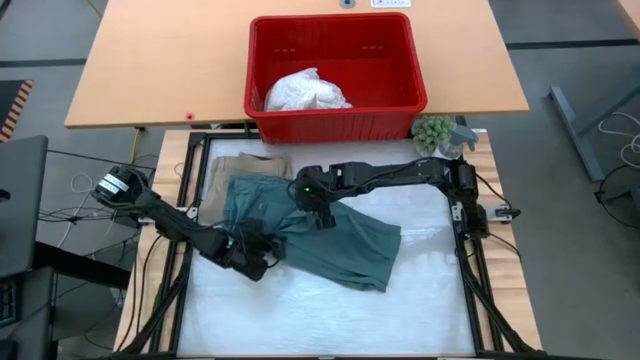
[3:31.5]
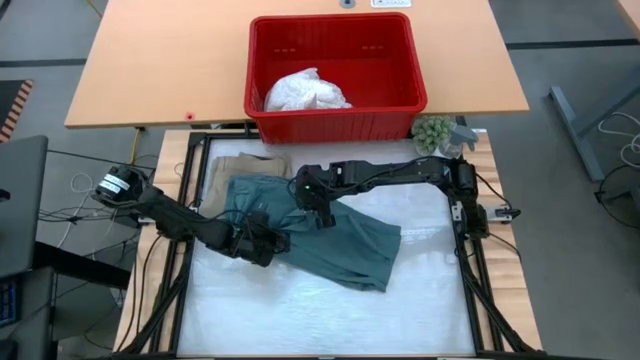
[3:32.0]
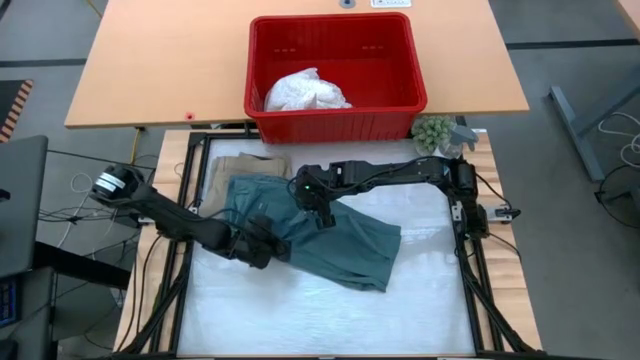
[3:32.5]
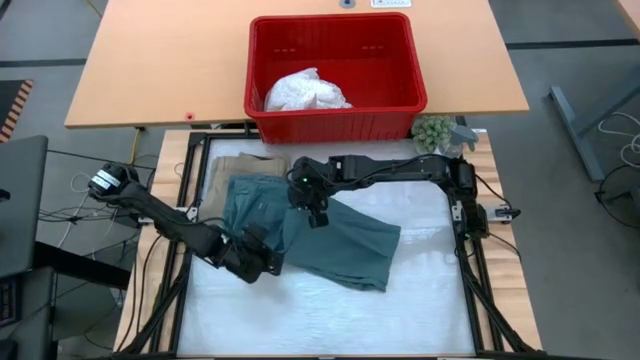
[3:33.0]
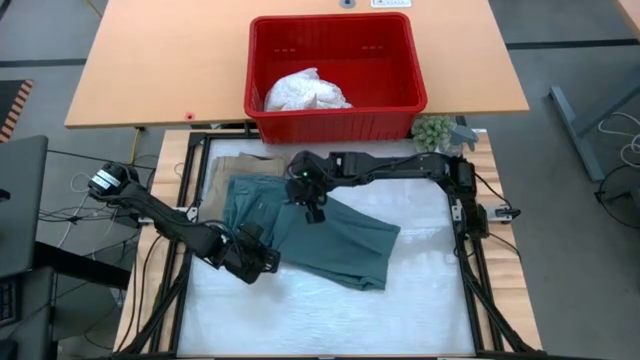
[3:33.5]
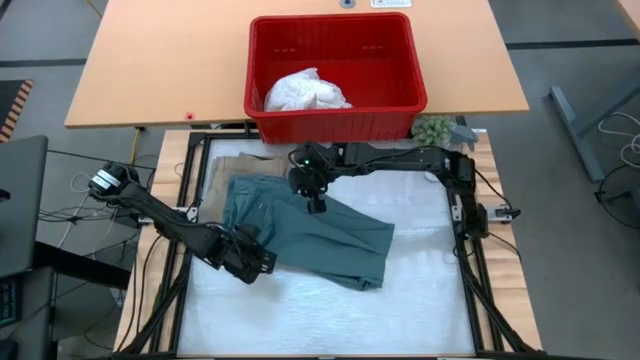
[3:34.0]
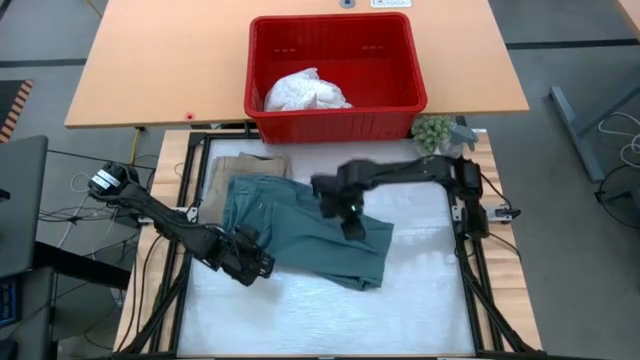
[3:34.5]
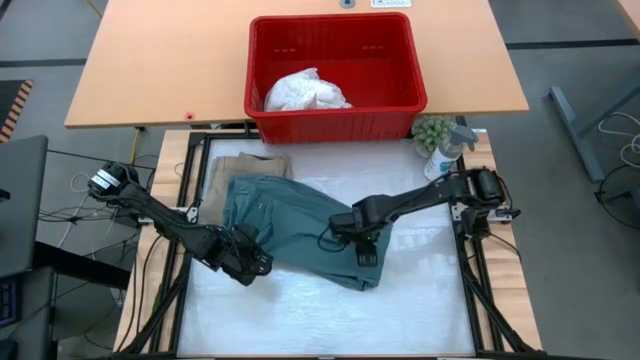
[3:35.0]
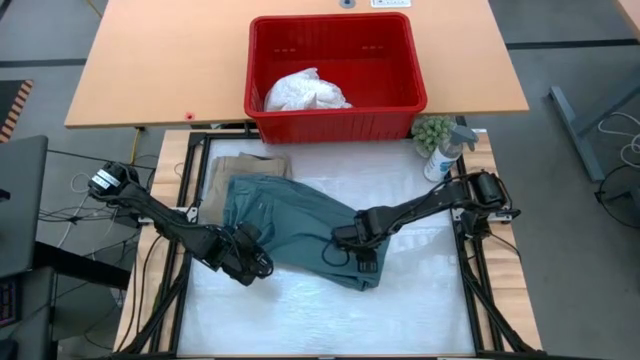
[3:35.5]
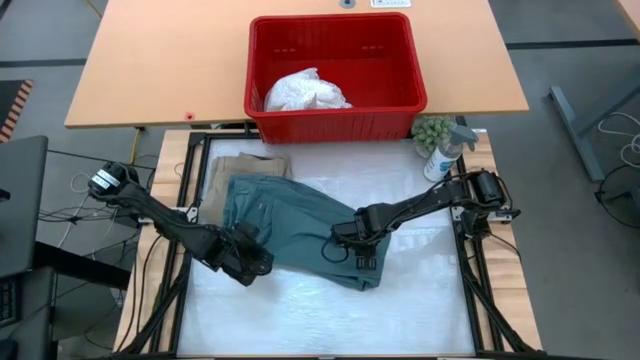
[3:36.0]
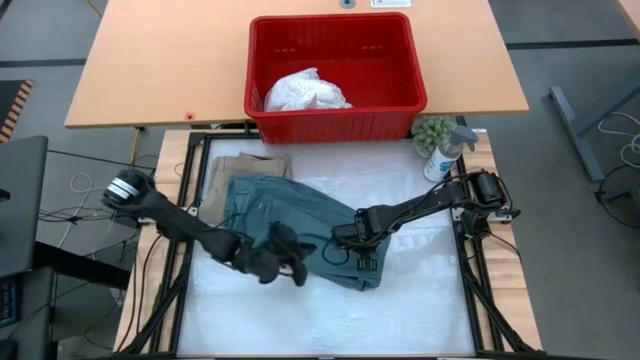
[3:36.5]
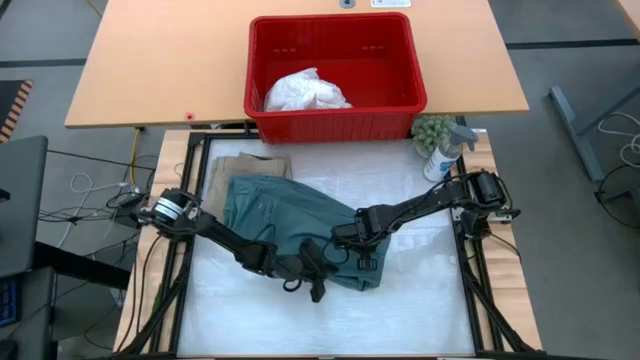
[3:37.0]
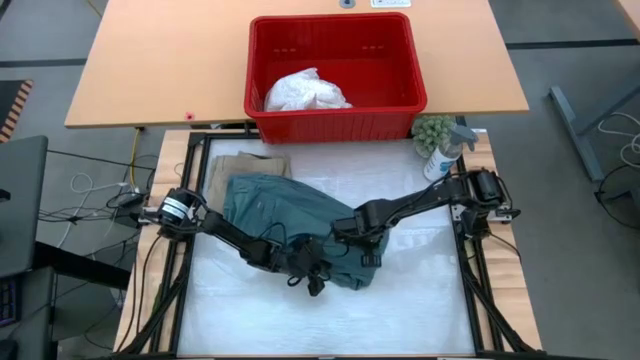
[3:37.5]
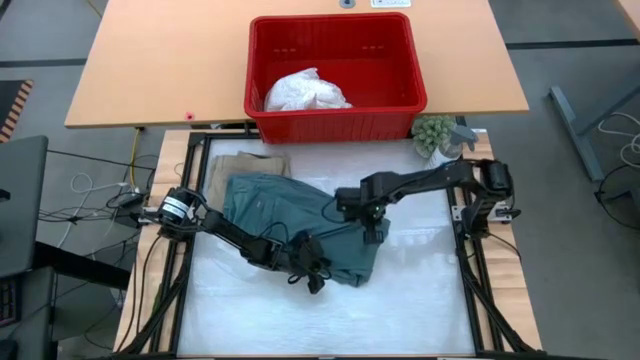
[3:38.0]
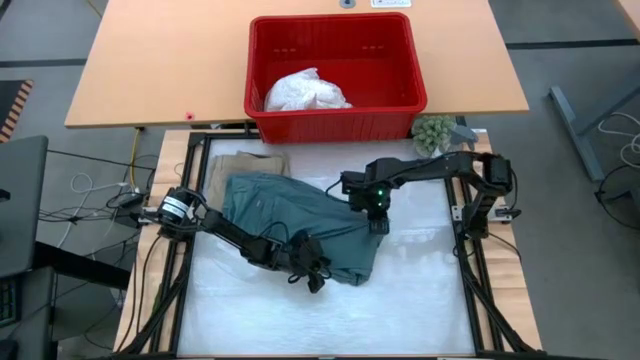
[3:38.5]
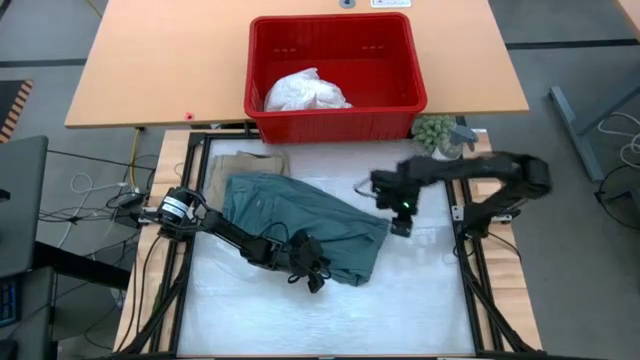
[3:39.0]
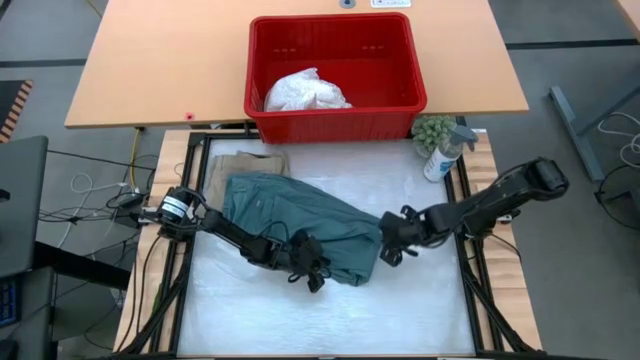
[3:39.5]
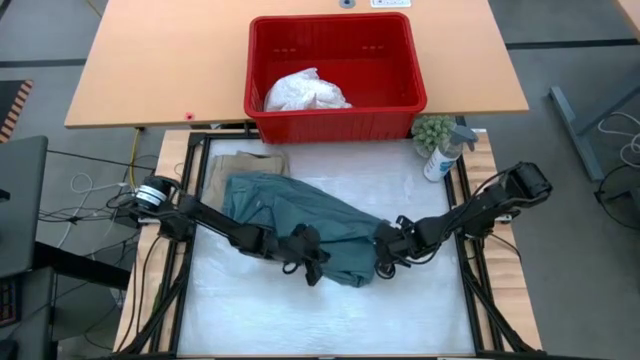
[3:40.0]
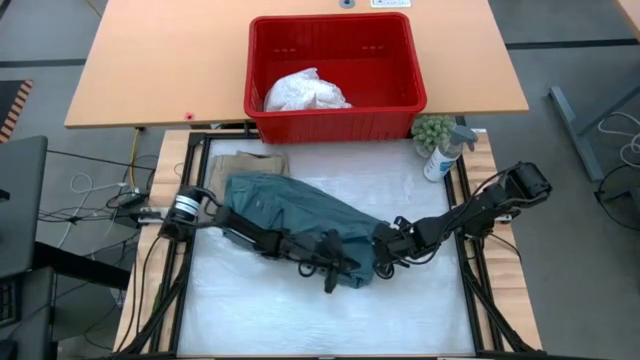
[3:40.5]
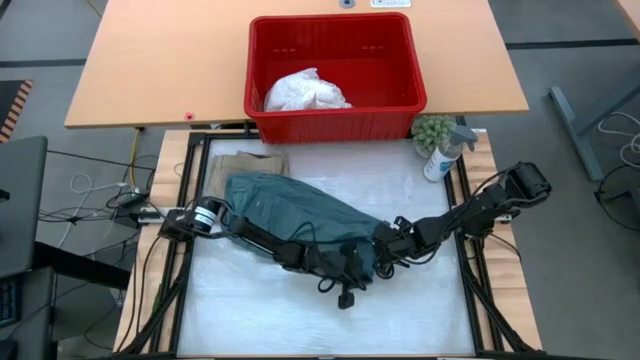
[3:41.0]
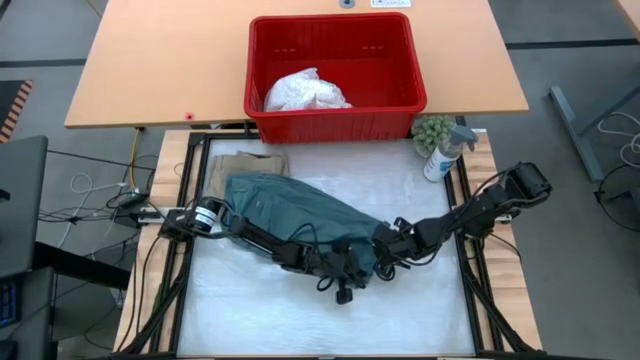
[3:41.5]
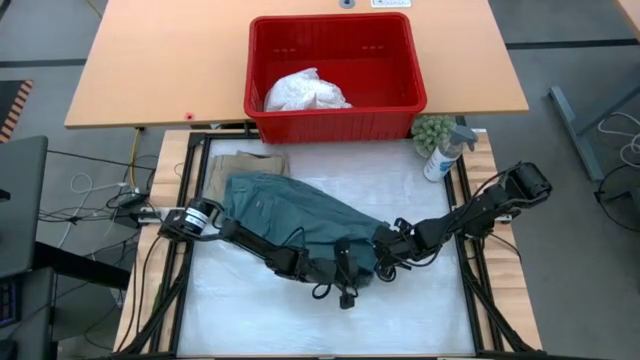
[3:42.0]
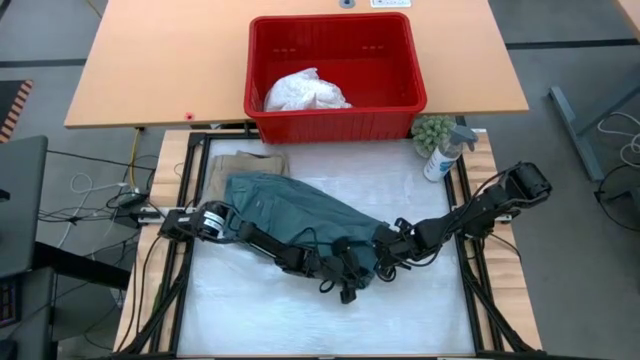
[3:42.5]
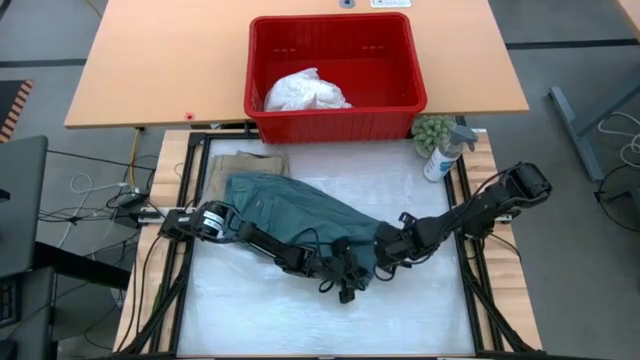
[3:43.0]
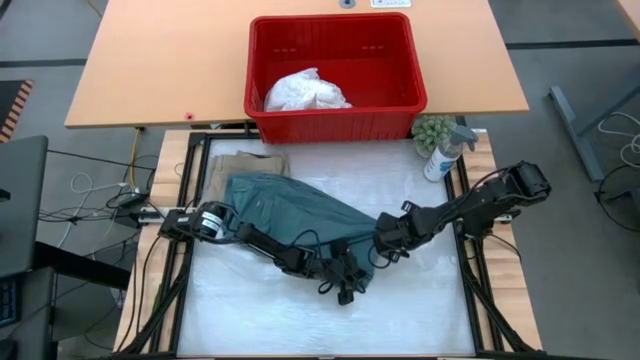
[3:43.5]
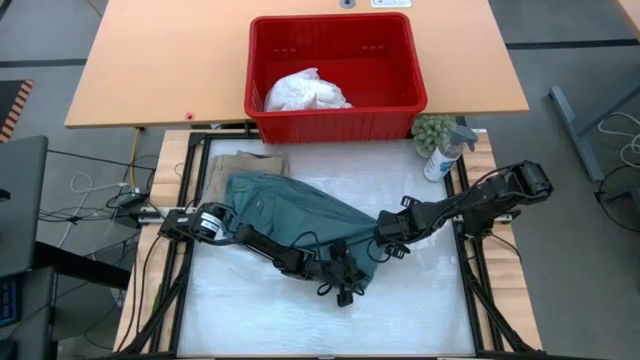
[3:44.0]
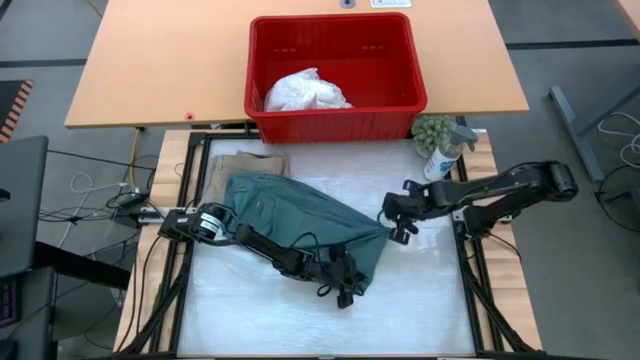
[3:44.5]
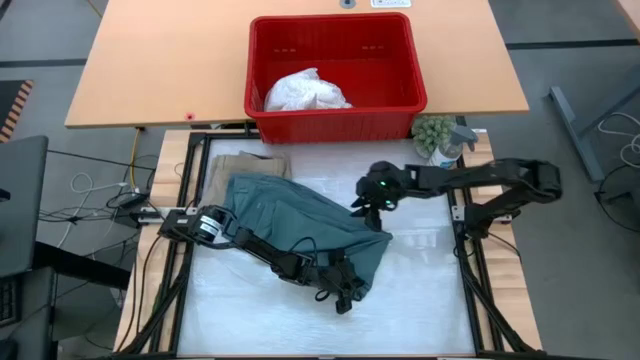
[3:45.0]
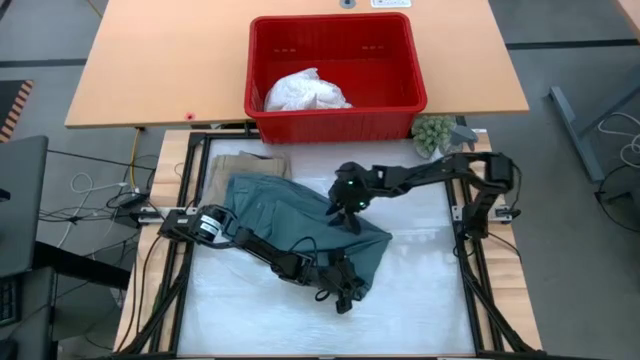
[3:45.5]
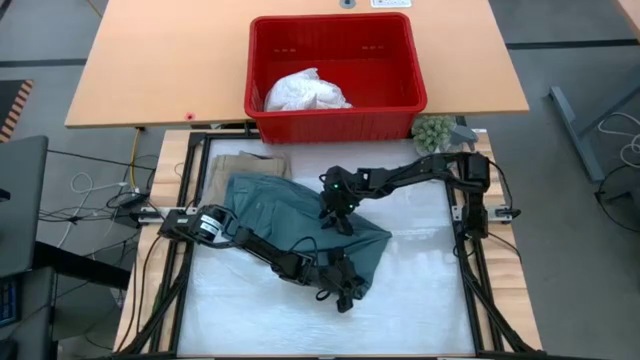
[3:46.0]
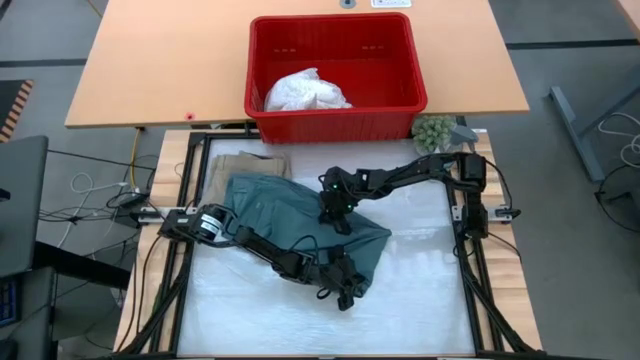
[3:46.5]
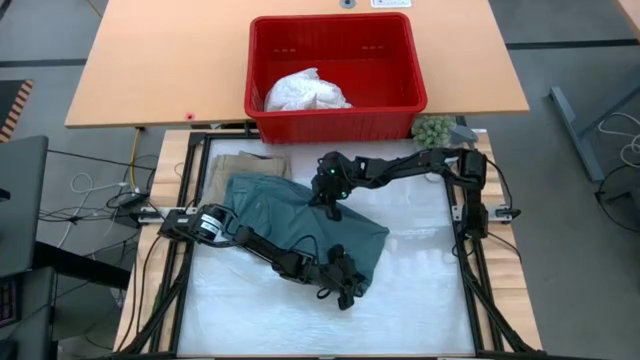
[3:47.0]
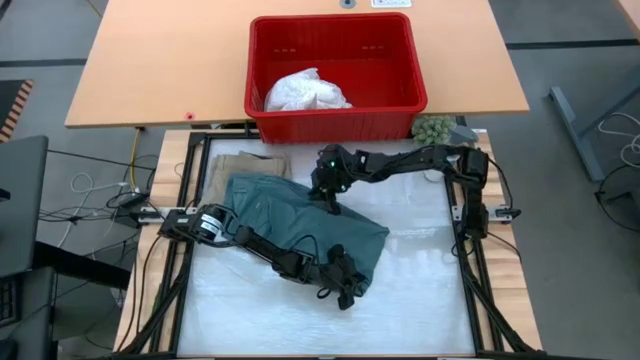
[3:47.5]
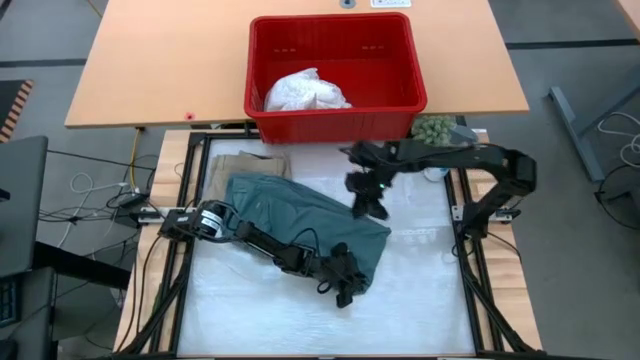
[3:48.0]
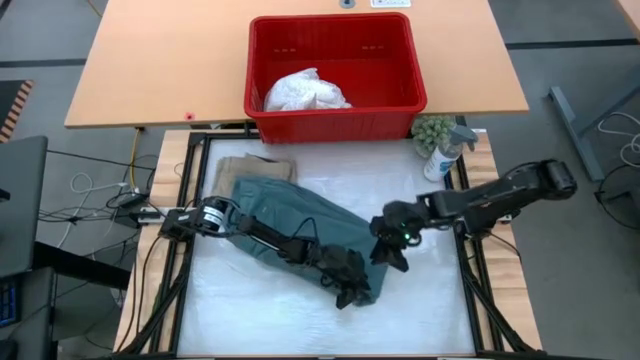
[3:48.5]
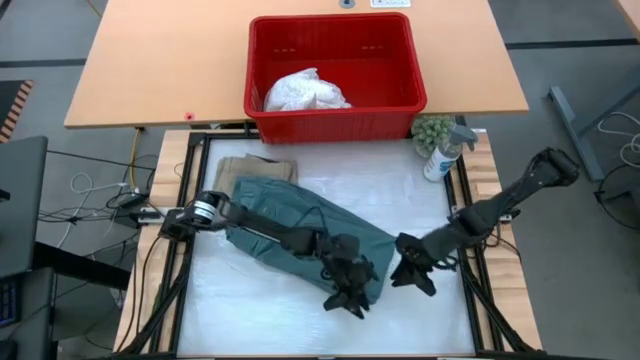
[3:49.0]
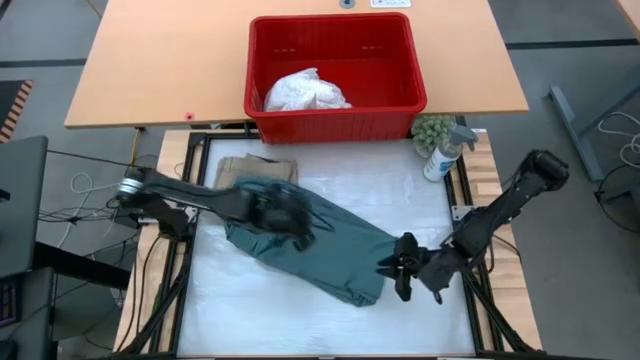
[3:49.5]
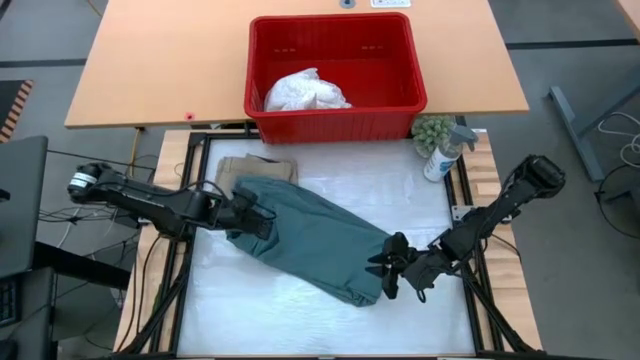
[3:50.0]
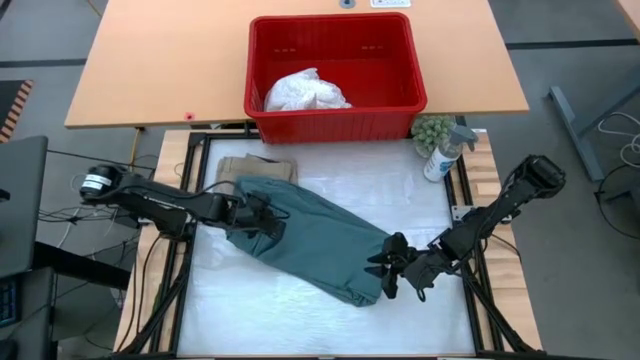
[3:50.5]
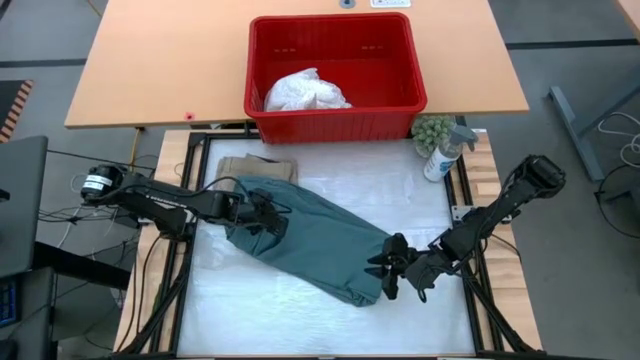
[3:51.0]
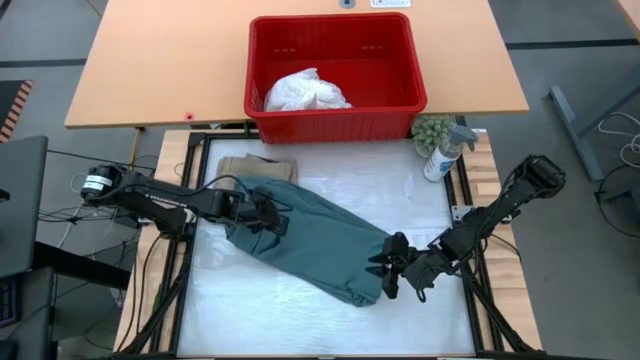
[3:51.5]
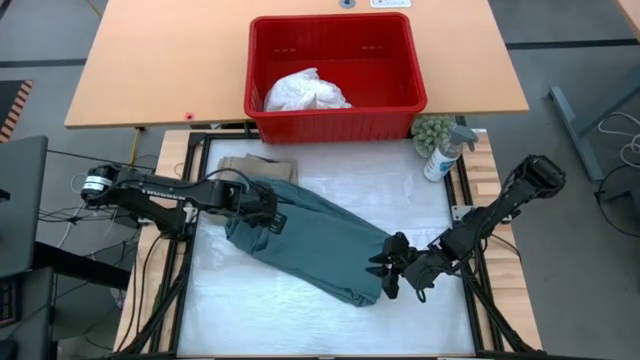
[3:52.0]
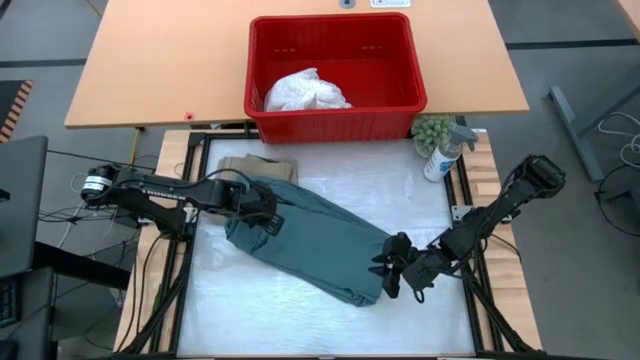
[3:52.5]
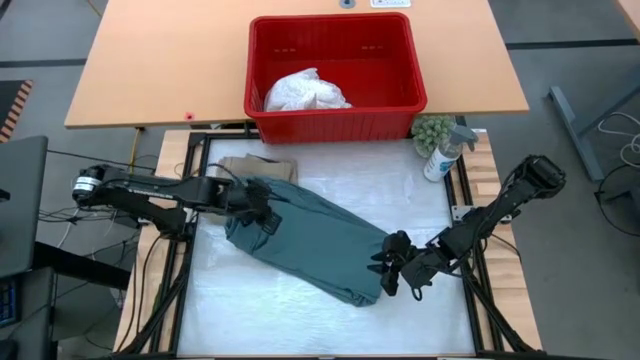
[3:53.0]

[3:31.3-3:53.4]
Task: Fold Laundry from Bin
Fold the blue pants in the red bin
